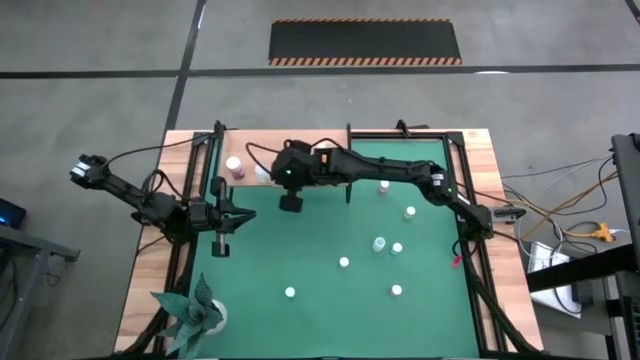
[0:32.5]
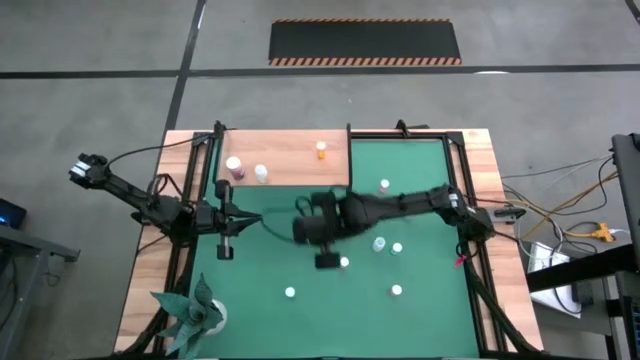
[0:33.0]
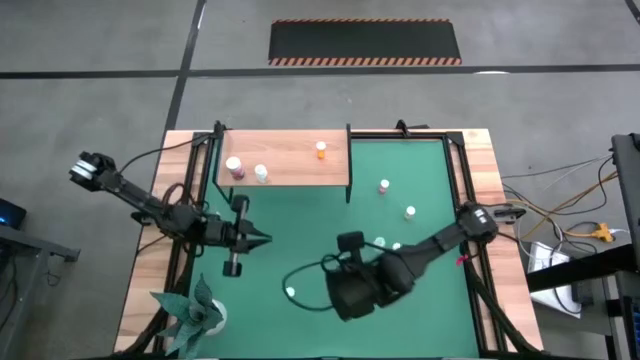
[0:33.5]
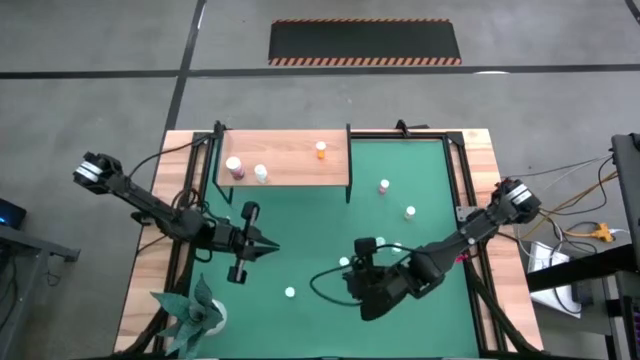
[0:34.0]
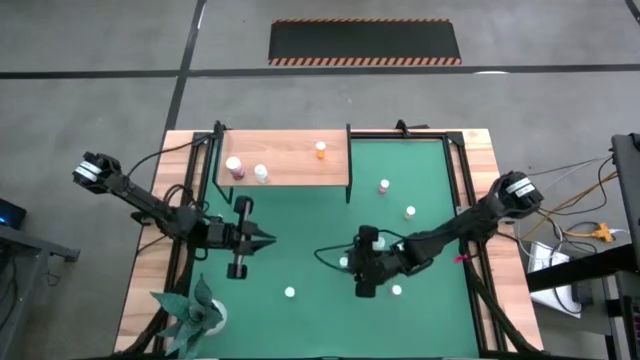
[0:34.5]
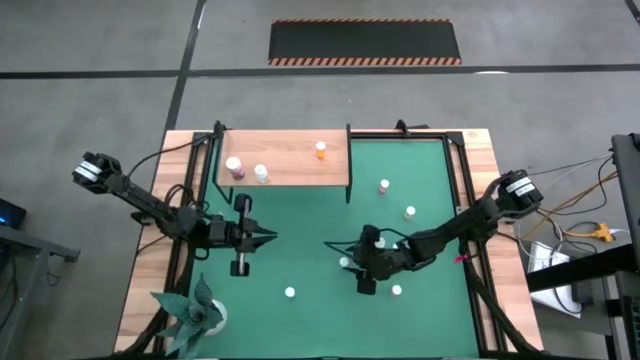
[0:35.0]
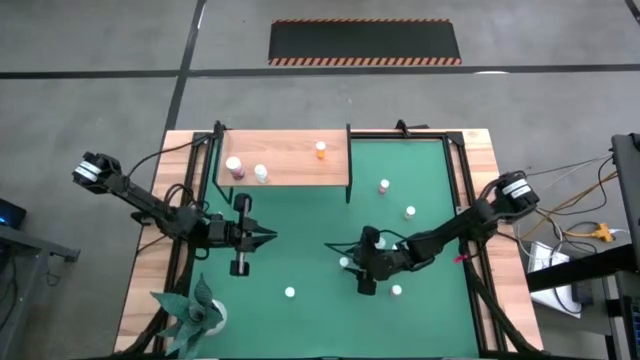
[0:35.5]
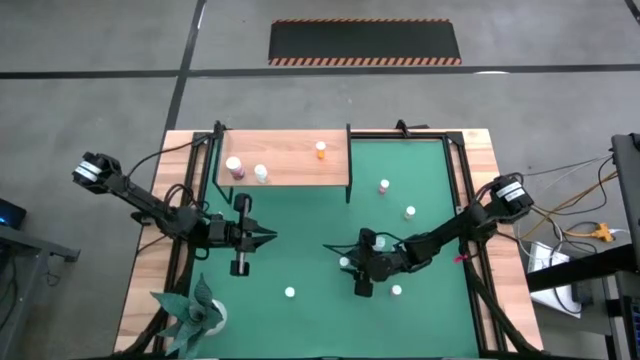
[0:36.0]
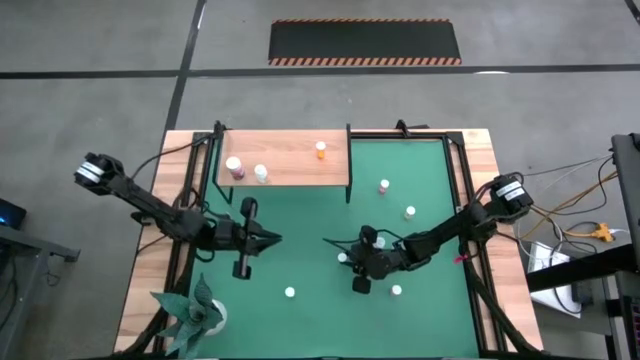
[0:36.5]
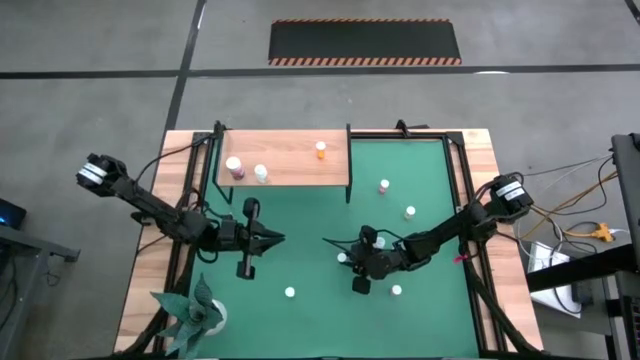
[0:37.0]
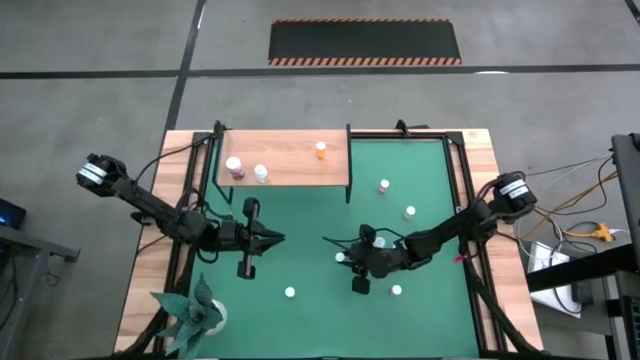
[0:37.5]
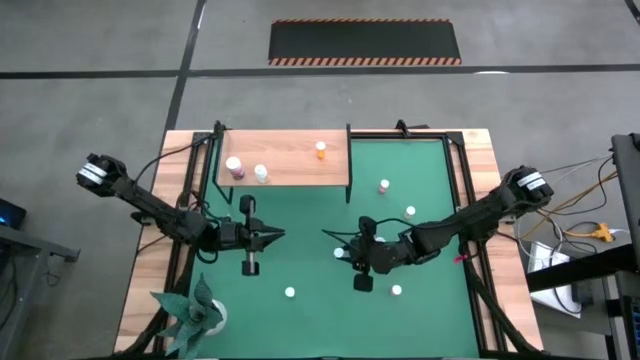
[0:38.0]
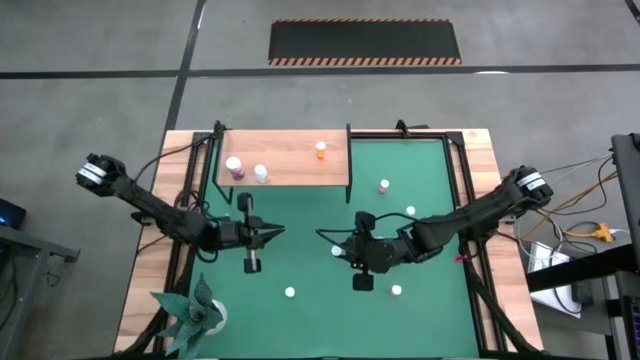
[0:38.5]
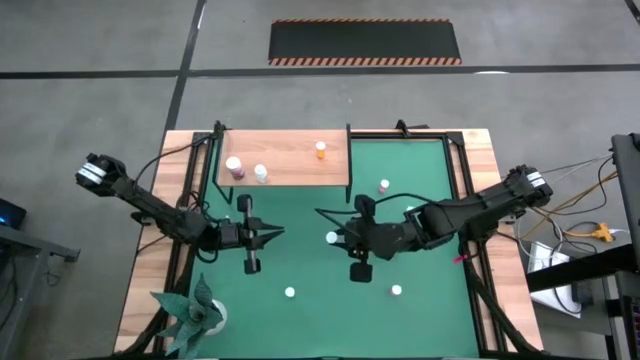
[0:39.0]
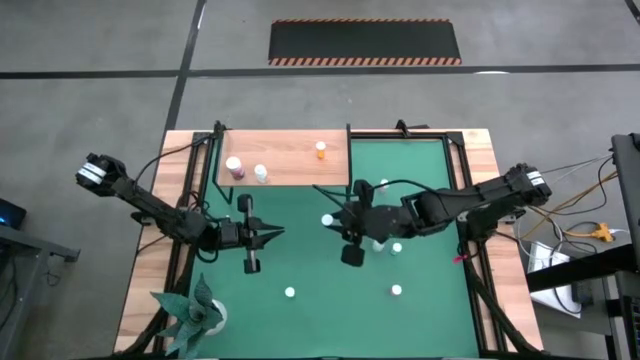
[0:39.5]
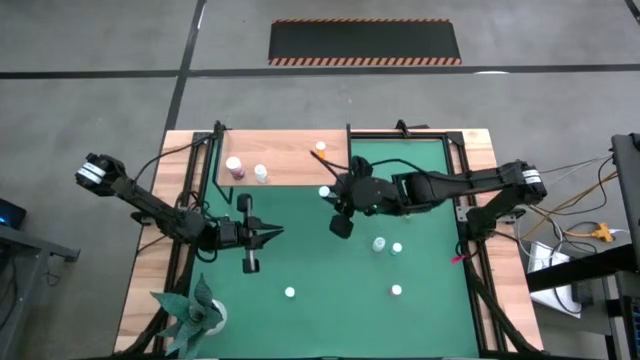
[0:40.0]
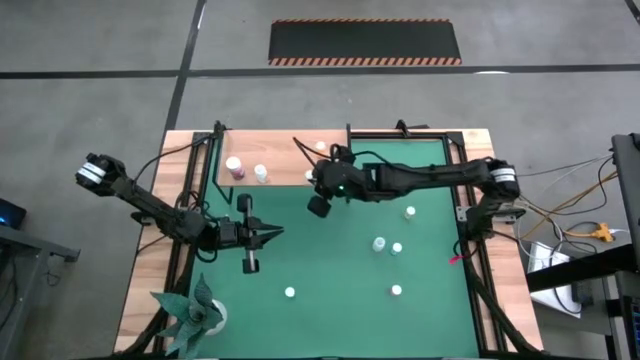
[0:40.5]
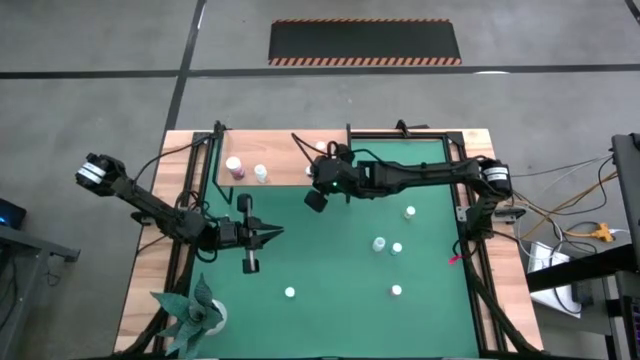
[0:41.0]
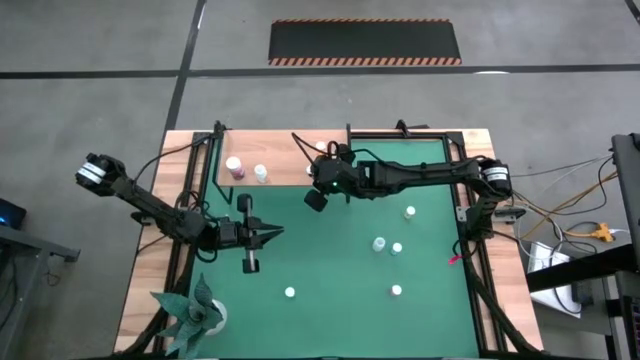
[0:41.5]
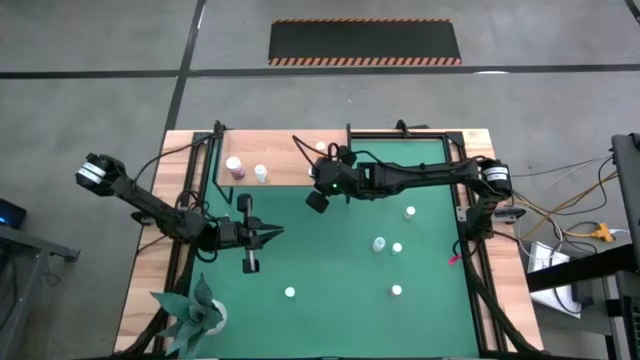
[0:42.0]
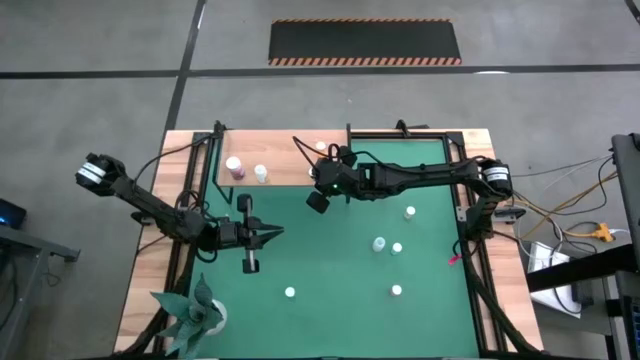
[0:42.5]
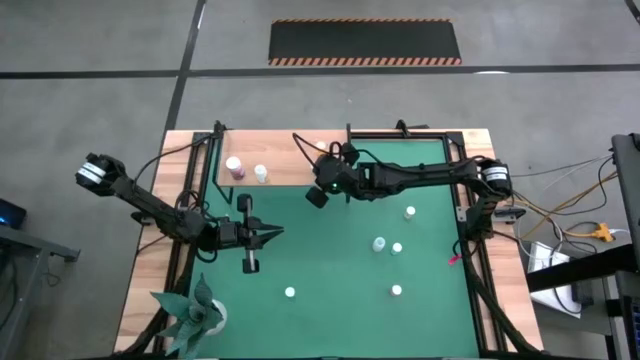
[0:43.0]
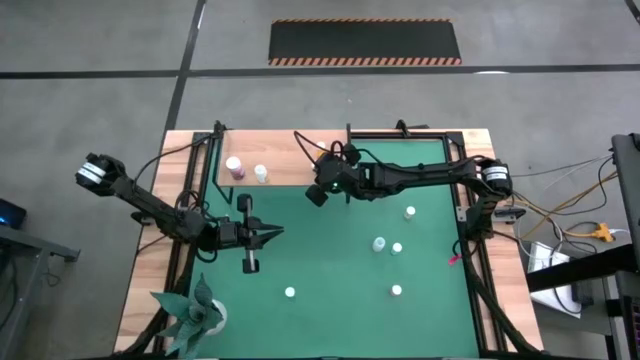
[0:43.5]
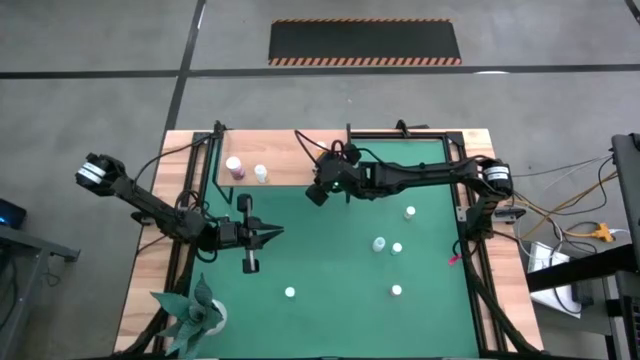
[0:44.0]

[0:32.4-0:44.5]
Task: Pick and place medicine bottles onto shelf by color
Put the bottom yellow pill bottle on the shelf

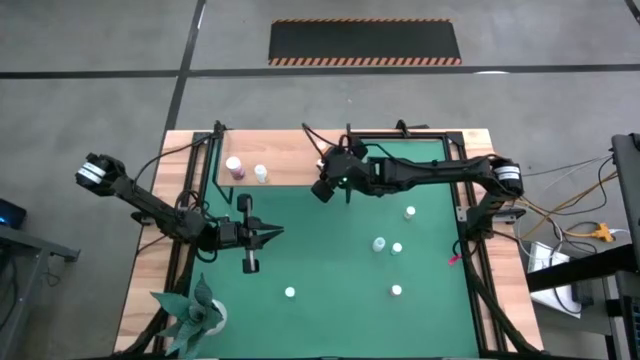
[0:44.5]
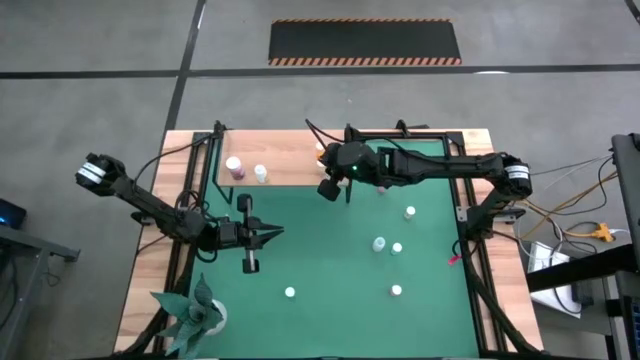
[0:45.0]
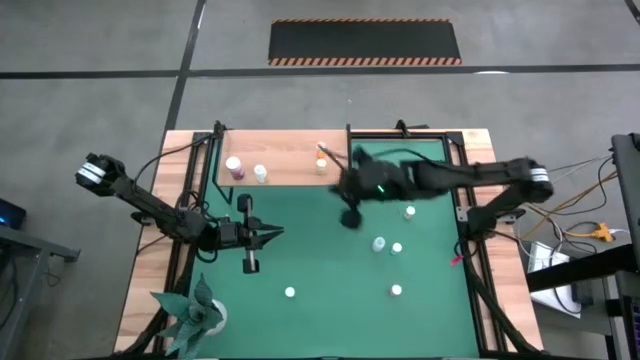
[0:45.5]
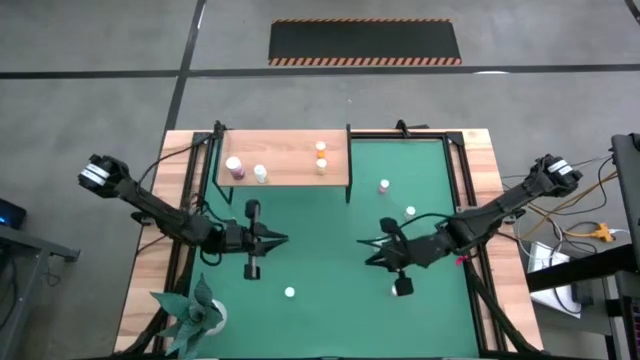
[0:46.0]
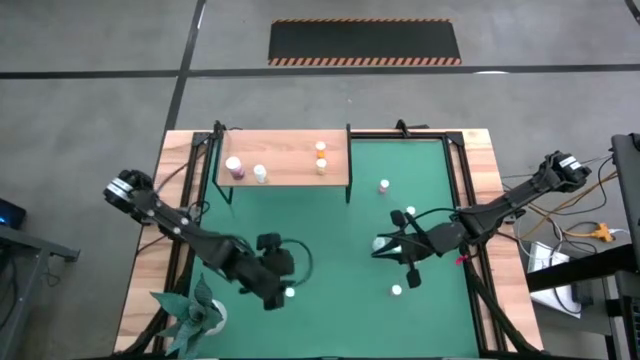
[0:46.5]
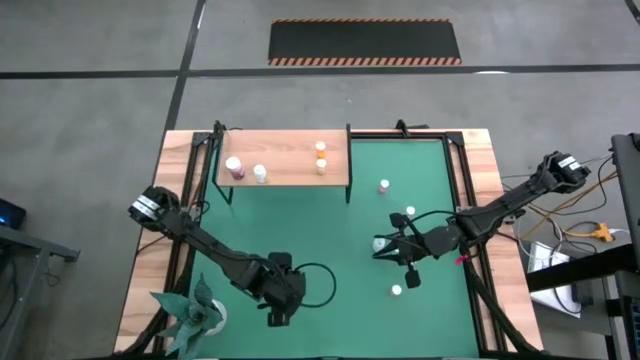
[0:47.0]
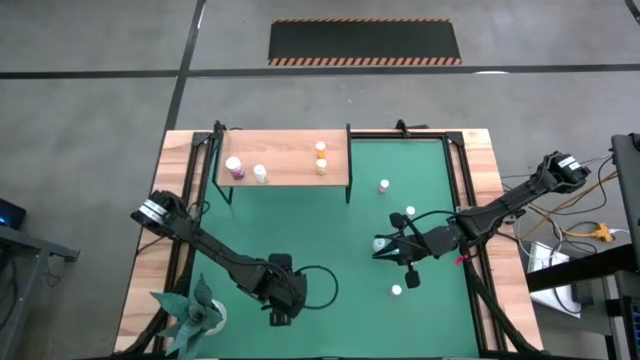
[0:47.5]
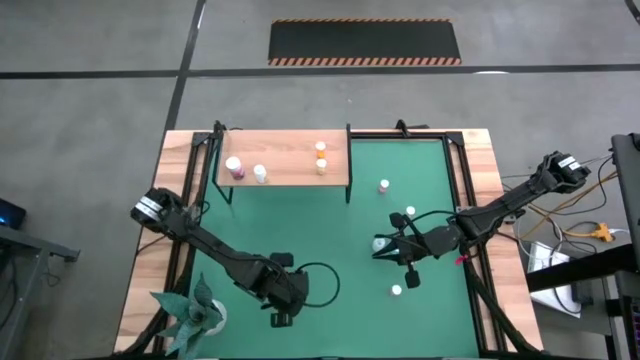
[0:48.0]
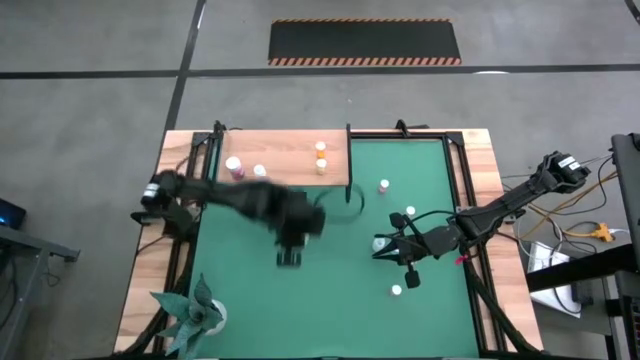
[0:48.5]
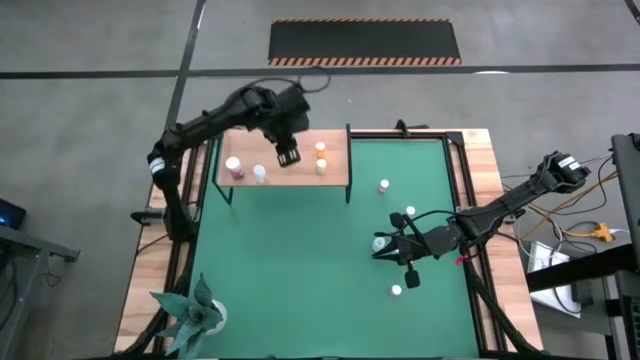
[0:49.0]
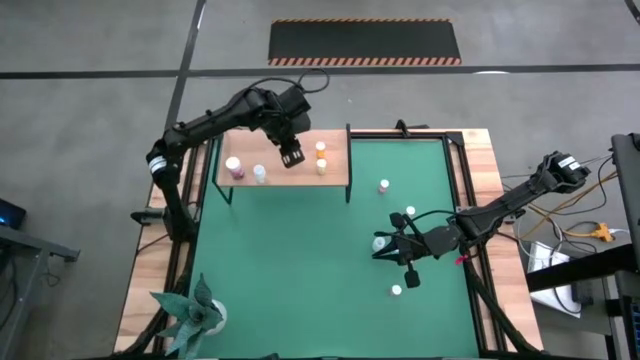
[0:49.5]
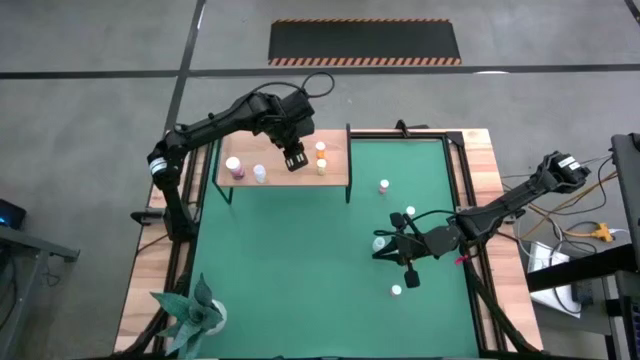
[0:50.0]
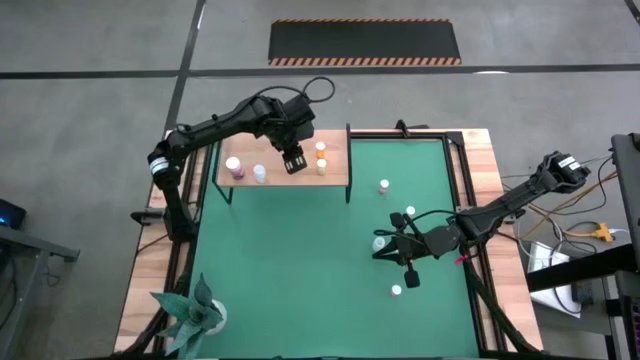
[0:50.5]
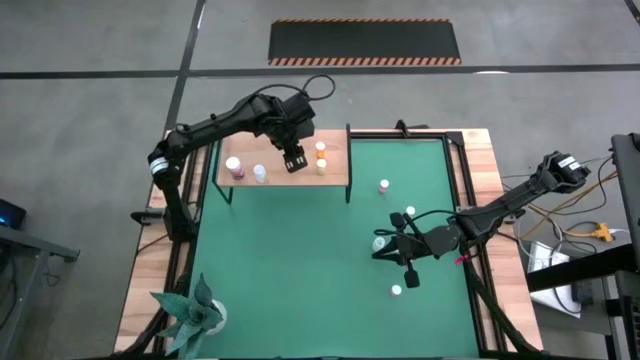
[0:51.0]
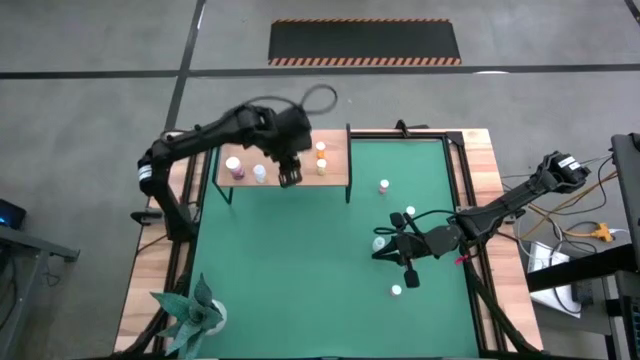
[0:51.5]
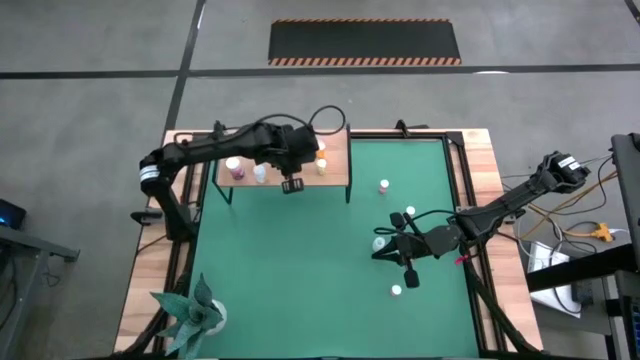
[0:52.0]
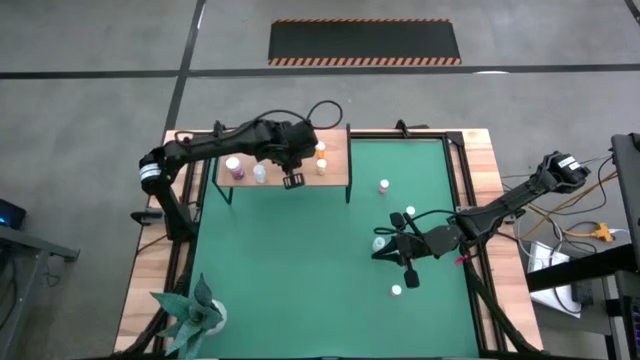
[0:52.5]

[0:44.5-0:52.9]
Put the green pill bottle on the shelf

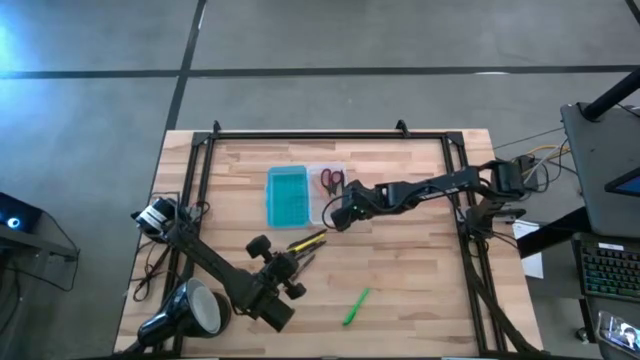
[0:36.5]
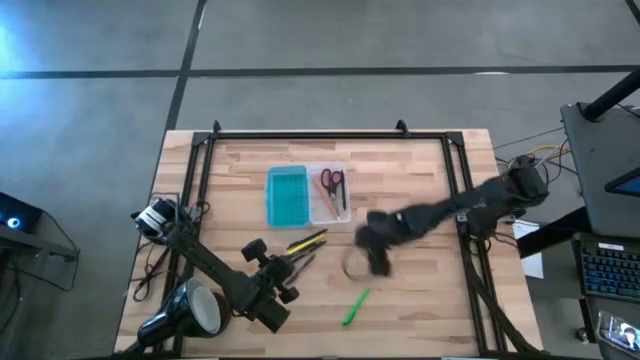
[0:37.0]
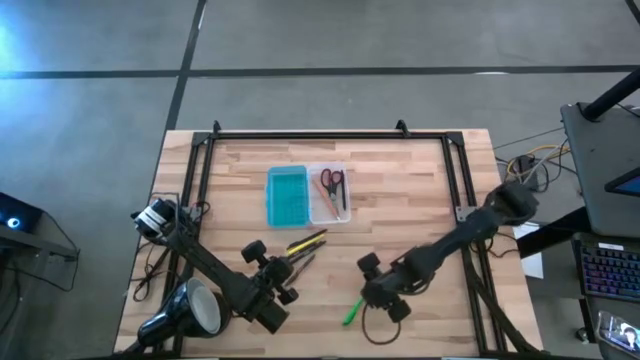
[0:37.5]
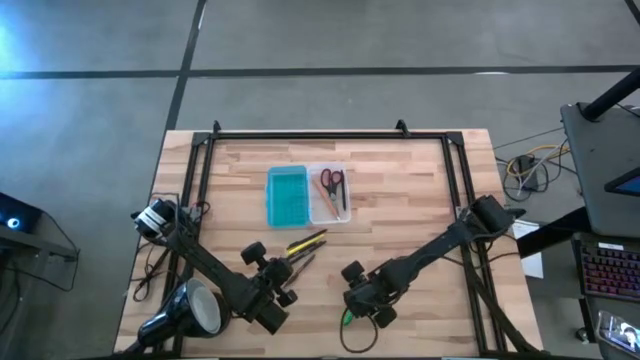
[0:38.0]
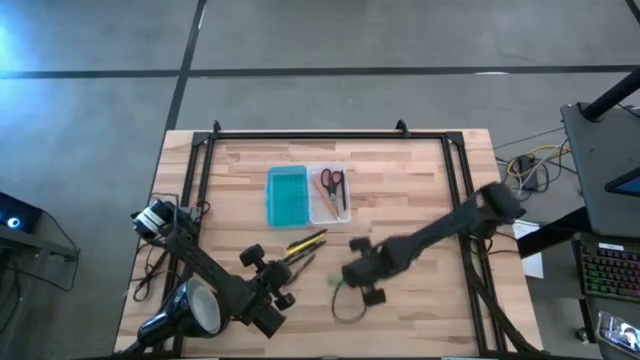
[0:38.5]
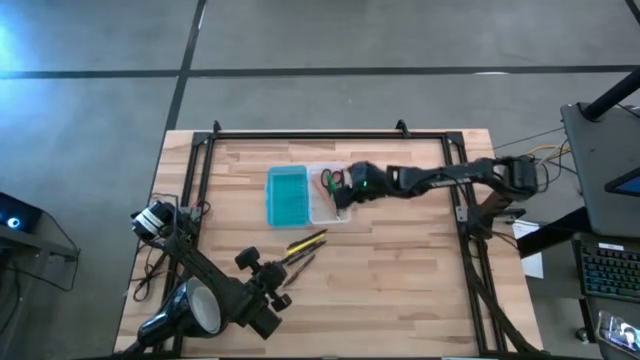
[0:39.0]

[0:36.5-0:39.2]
Task: Pick & place school supplies into a supply box
Put the green pen into the blue supply box
